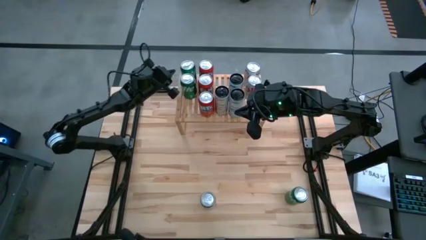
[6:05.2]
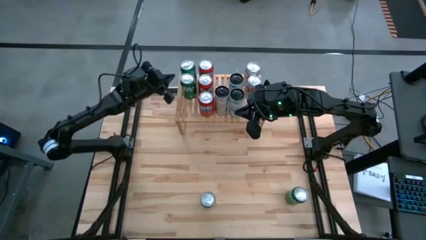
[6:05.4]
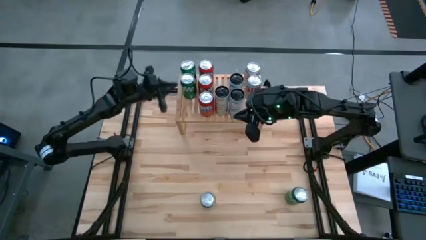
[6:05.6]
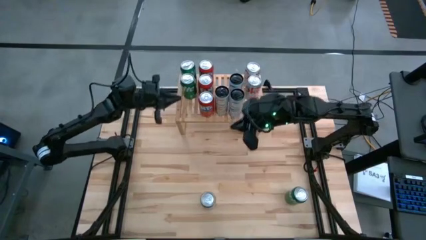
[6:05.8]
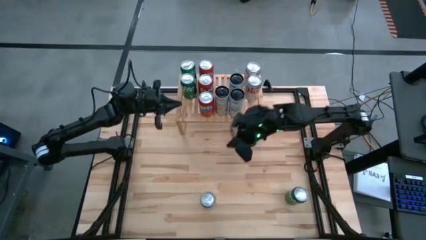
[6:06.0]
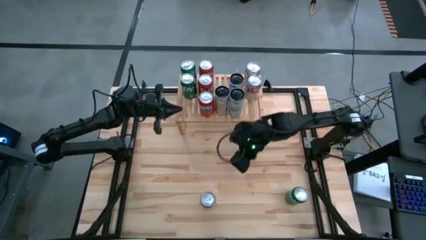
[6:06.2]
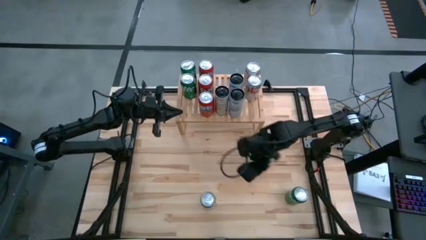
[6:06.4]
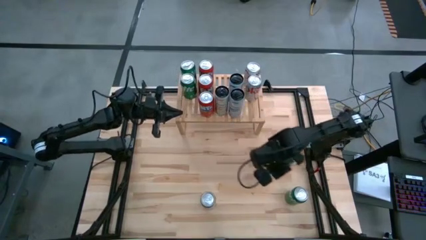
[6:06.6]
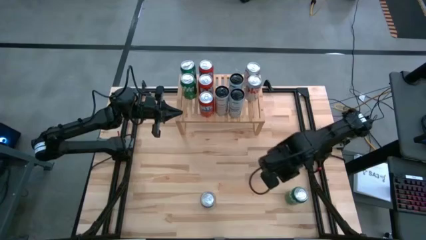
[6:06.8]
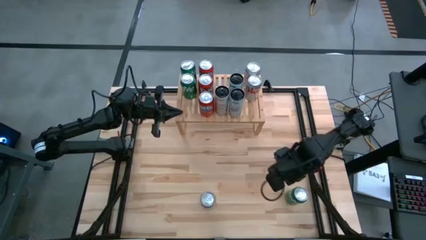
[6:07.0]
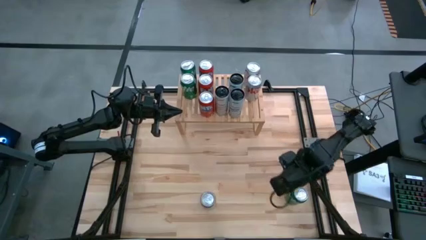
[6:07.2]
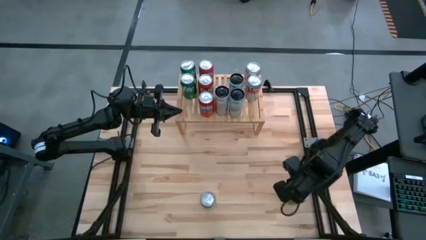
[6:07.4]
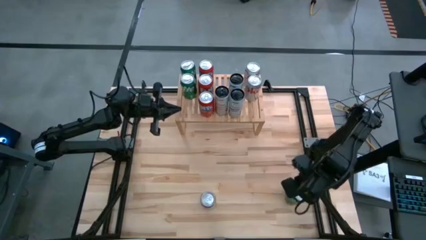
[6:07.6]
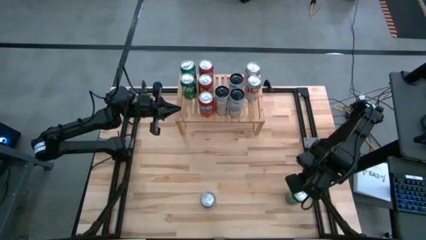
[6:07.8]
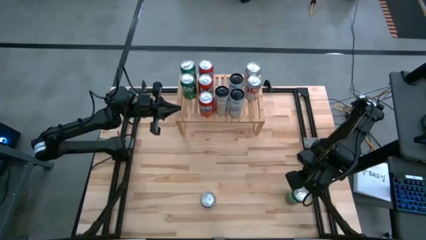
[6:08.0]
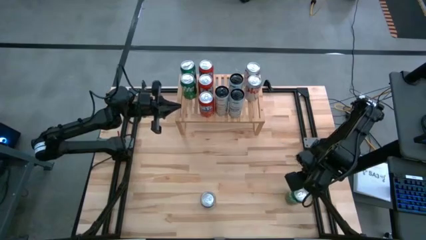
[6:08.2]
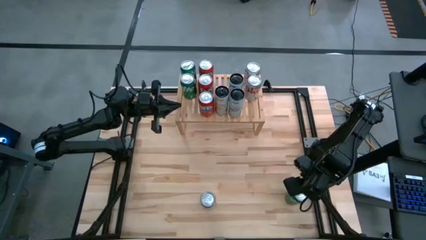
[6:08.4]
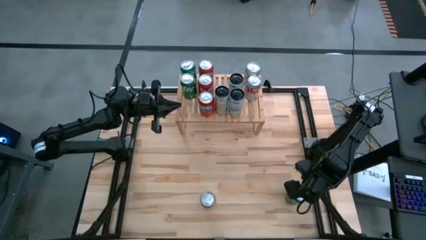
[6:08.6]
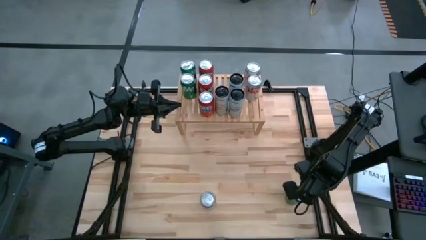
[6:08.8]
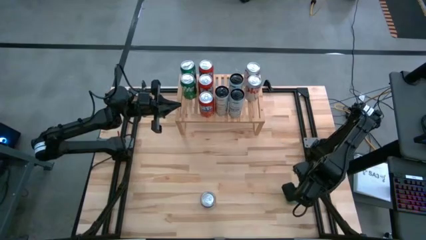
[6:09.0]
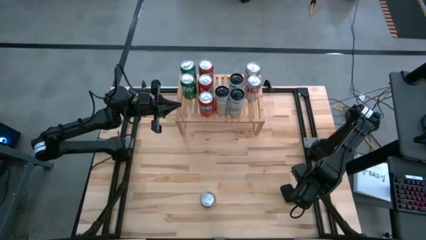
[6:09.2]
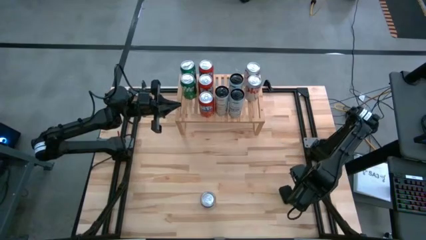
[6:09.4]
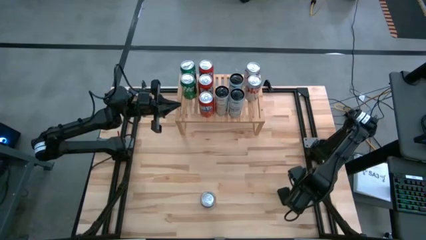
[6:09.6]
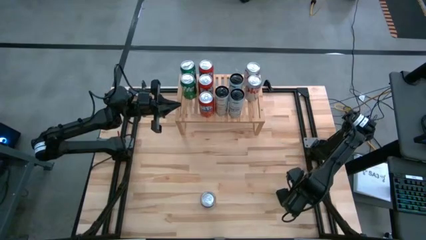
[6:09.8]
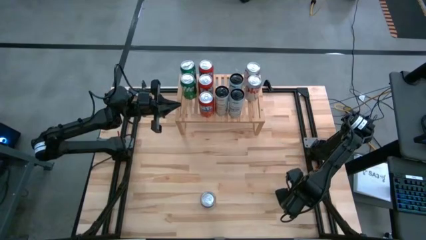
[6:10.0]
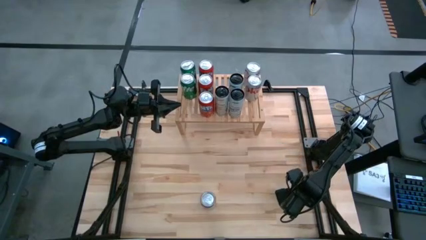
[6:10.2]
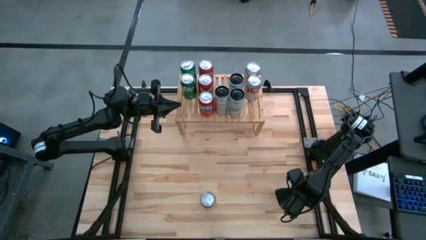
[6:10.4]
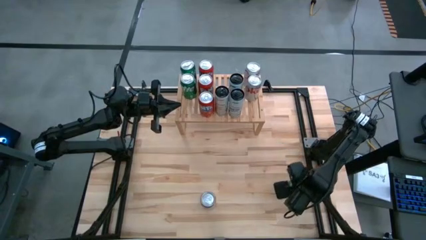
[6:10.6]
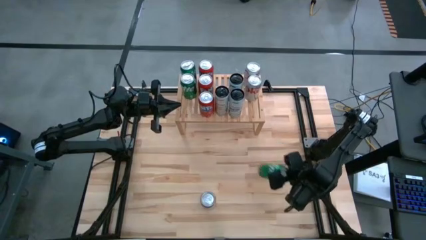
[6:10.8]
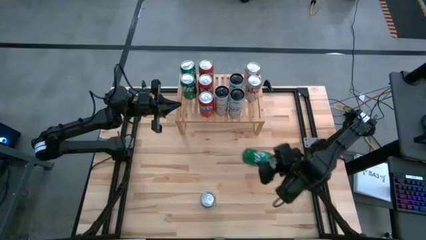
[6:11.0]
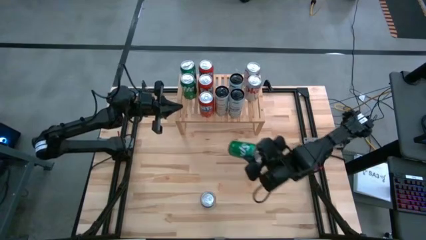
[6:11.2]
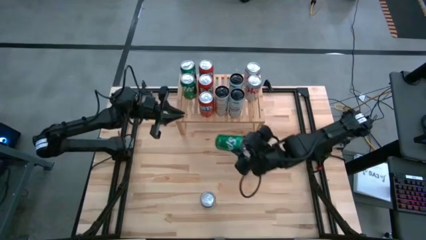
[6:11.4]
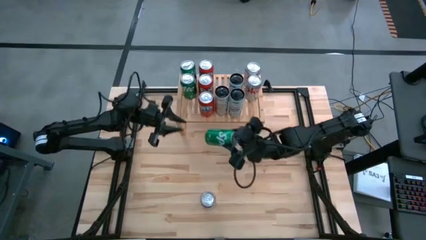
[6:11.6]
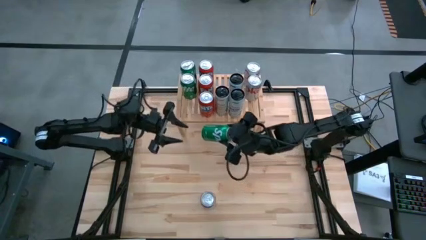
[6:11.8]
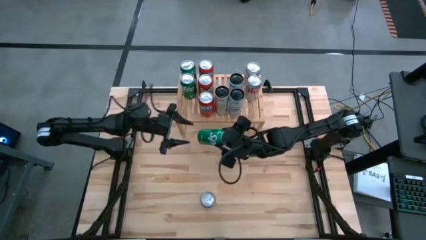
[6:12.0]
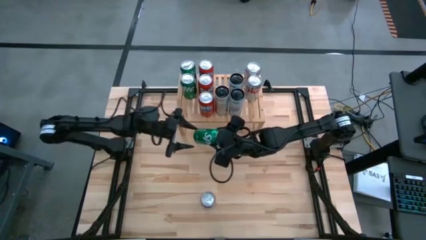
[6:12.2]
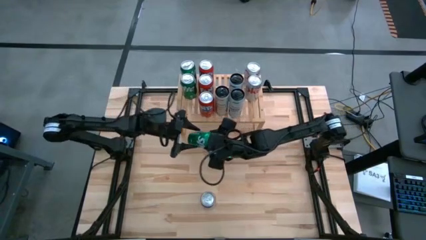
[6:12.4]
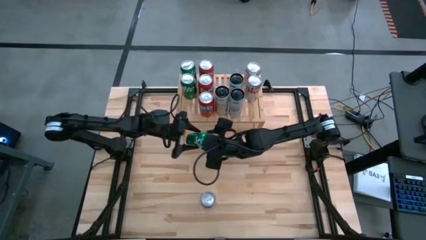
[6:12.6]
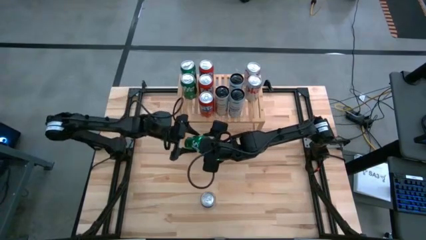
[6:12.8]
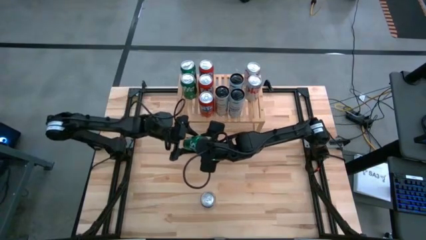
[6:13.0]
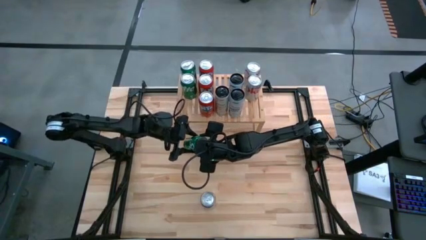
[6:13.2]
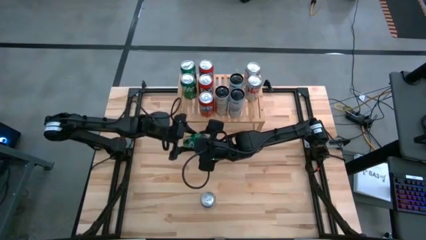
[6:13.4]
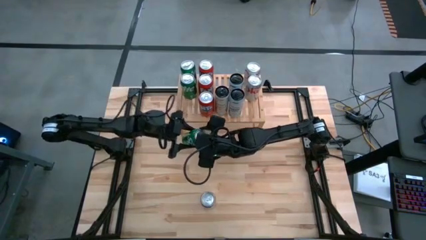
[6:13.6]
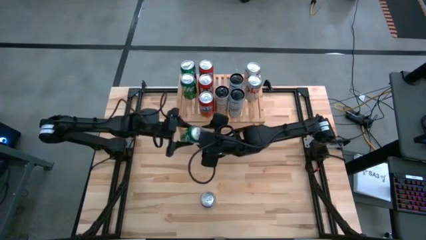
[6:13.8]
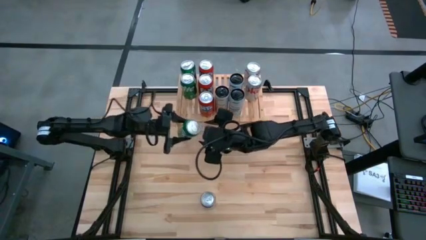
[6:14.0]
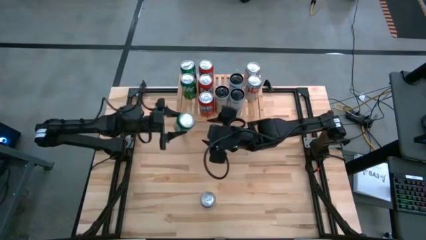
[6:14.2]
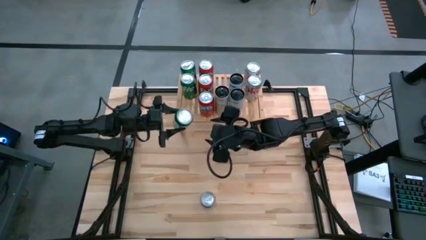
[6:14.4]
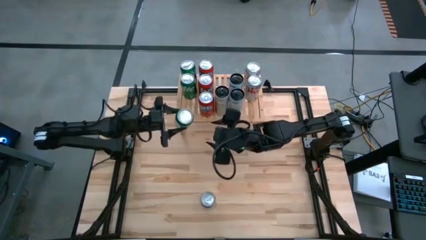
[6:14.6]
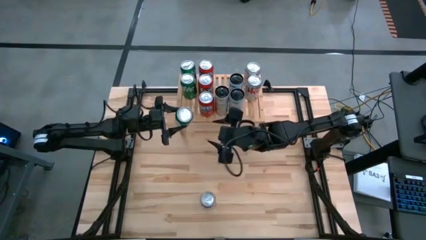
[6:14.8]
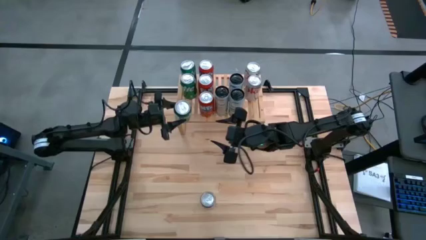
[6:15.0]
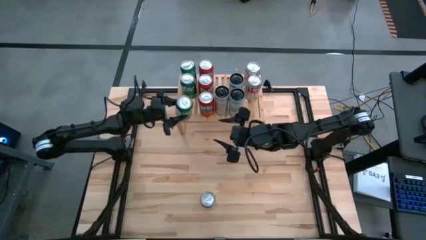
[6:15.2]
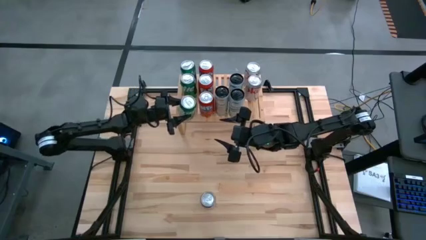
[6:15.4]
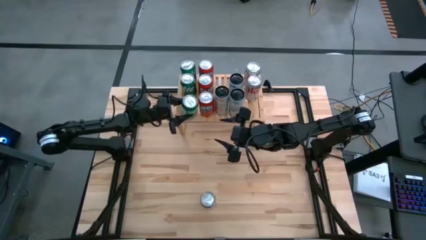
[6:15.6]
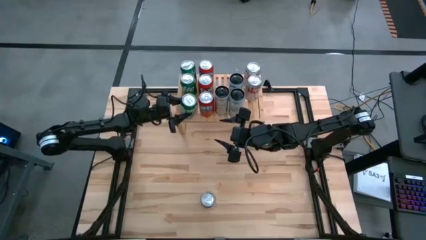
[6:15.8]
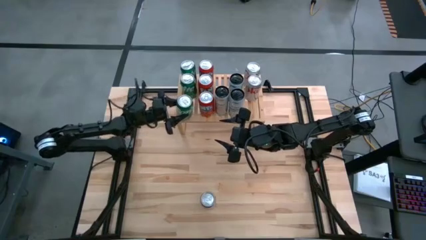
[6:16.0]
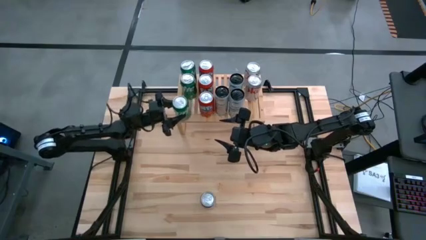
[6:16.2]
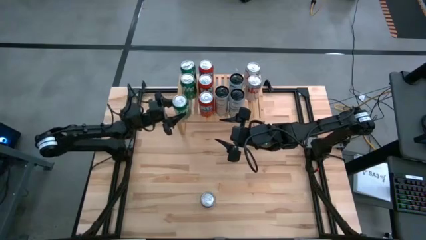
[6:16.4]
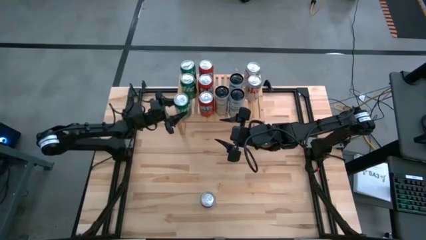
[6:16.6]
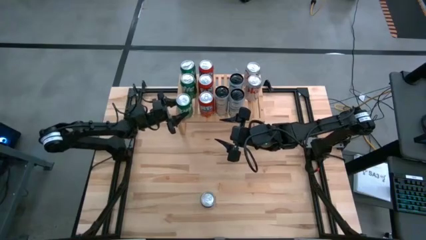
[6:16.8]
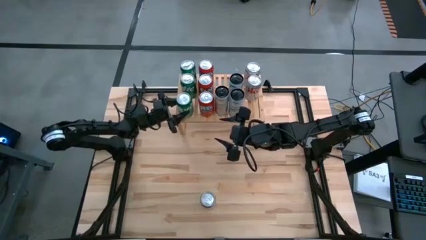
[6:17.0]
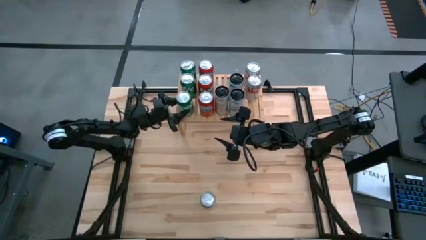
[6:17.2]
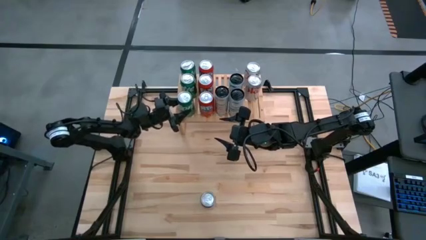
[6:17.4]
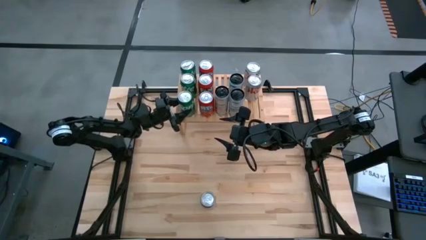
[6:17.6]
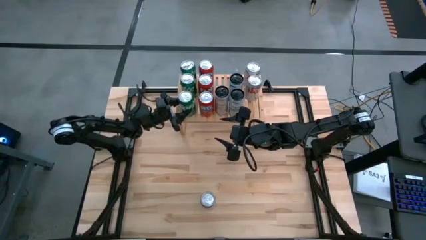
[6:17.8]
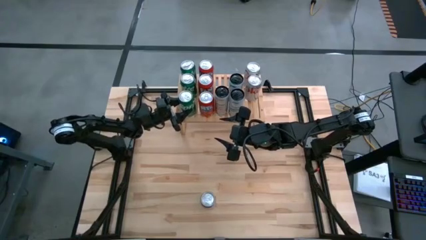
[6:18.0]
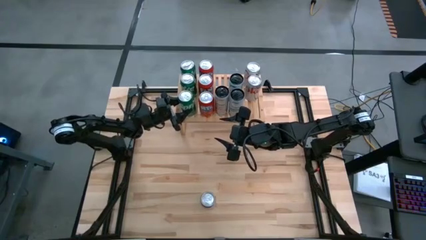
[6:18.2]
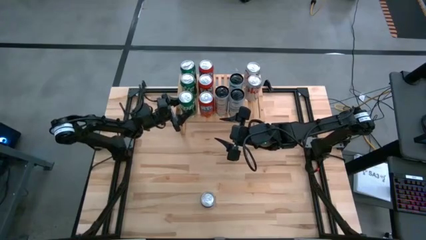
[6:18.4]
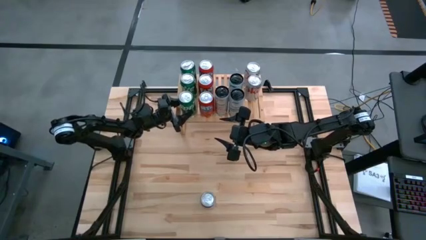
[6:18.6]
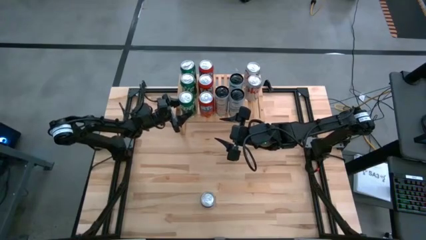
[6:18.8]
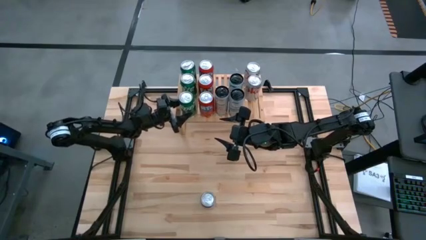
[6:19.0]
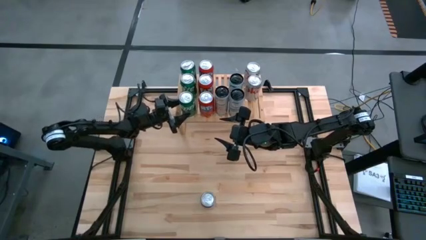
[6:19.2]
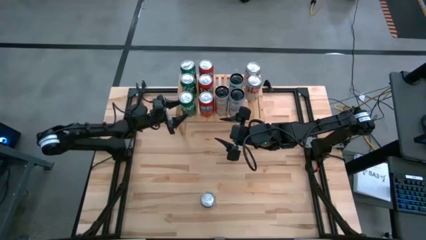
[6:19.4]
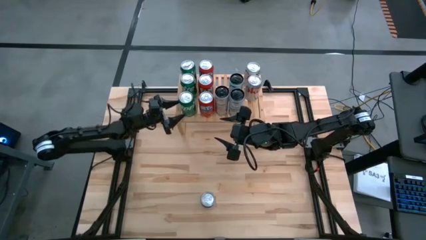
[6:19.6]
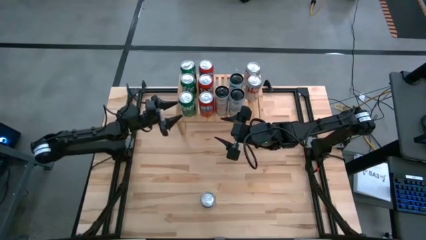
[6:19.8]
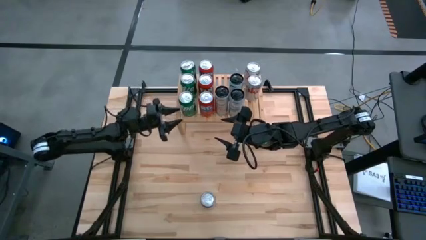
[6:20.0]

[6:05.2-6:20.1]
Task: Place canned beverage on shelf
Put the green soda can aligned with other green soda can on the shelf
